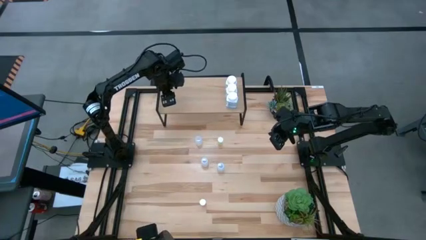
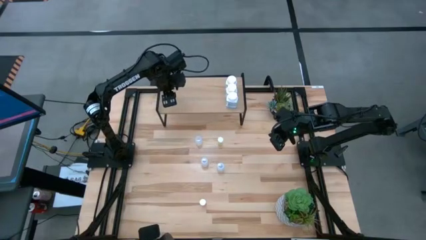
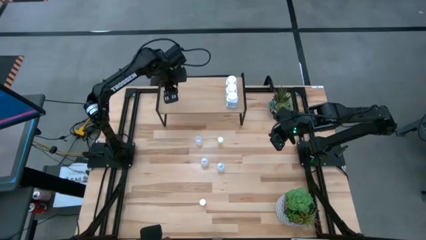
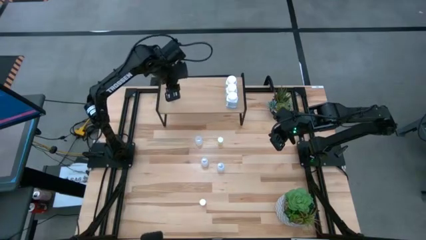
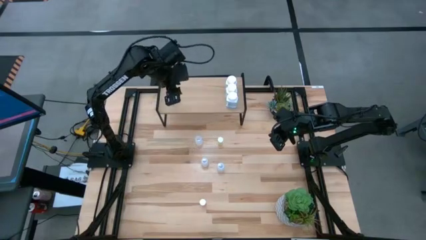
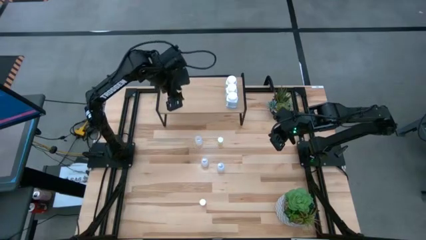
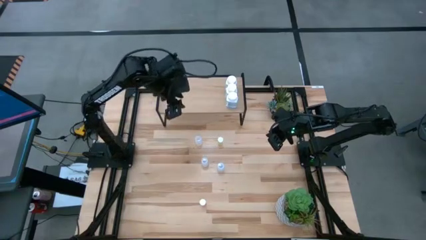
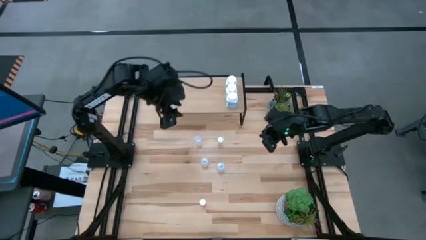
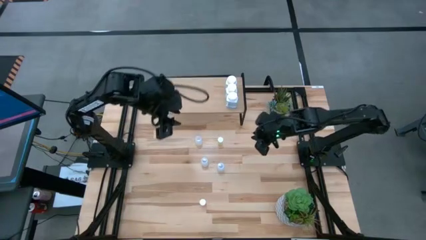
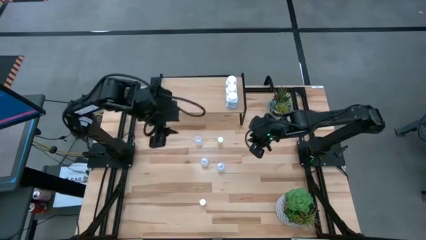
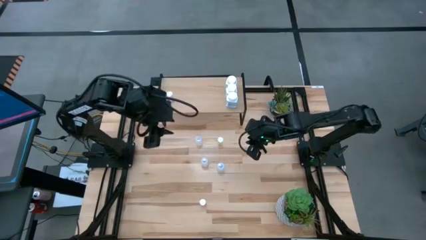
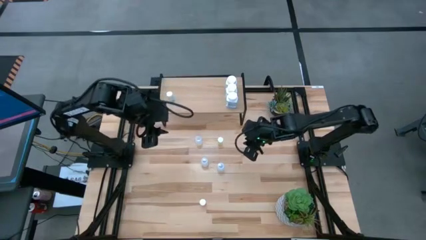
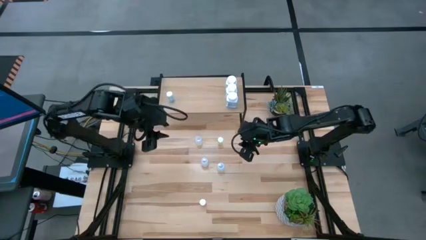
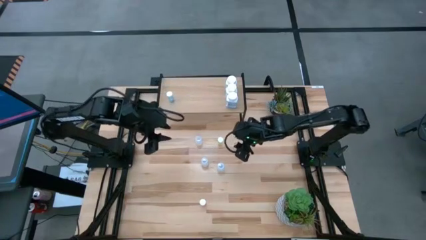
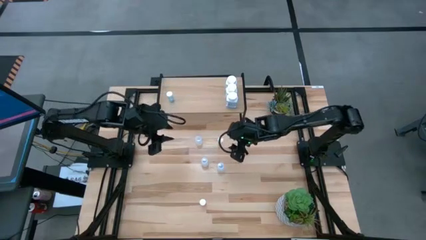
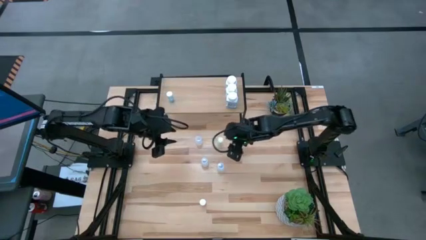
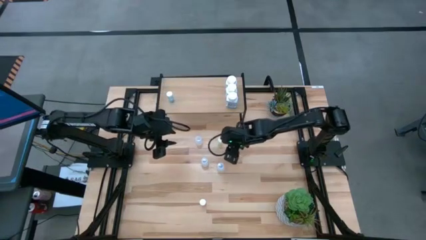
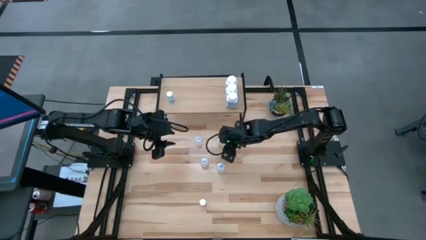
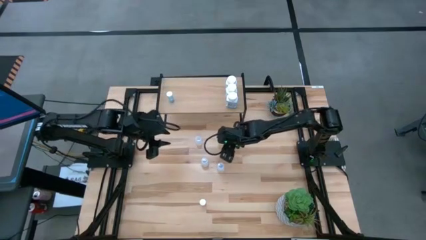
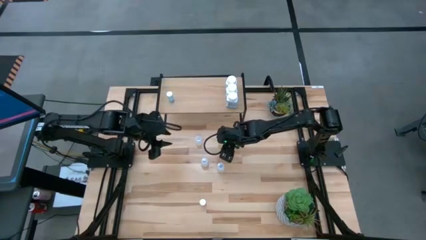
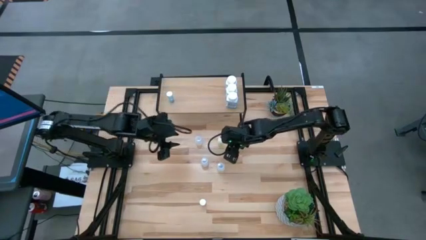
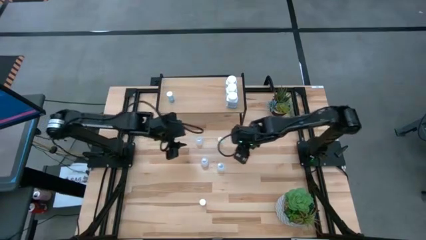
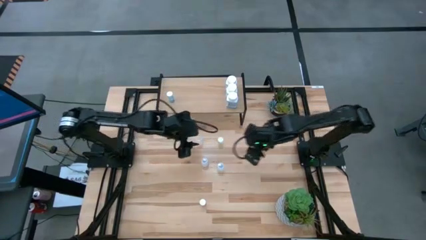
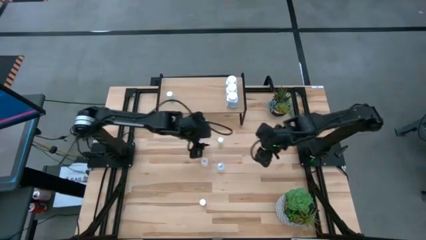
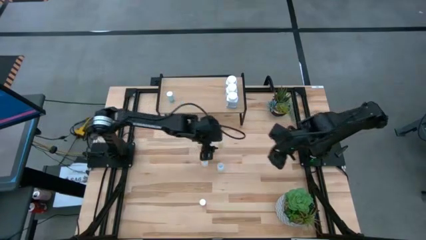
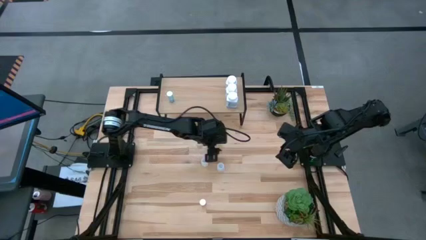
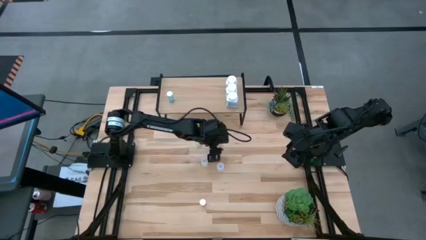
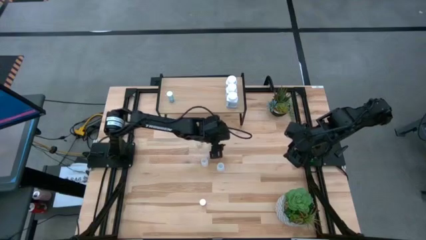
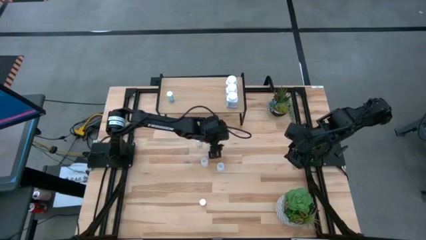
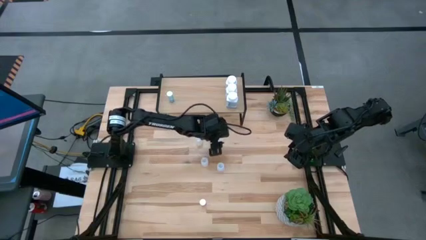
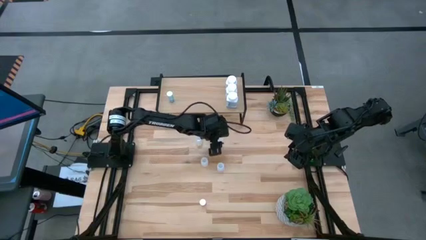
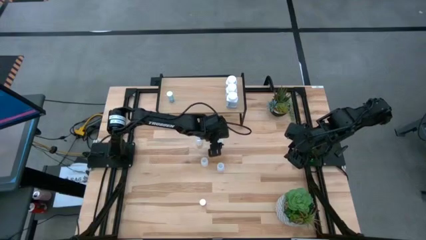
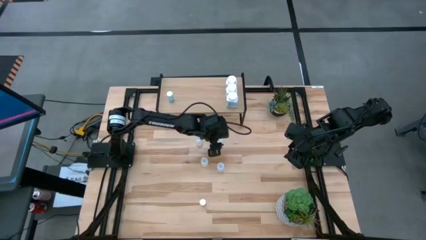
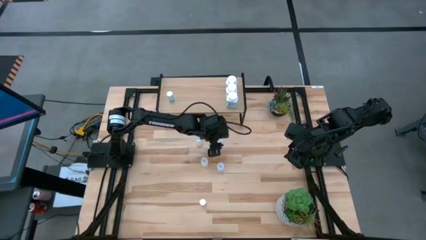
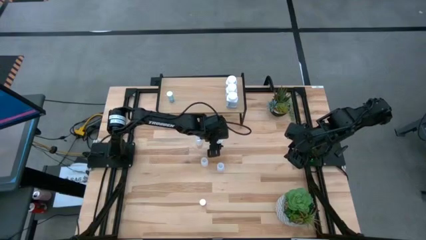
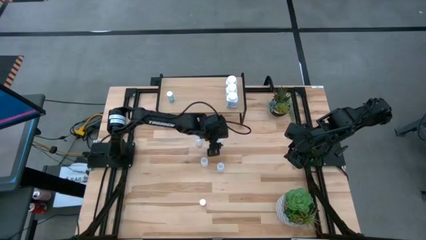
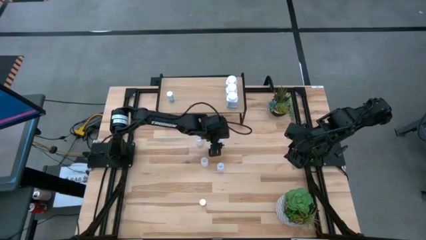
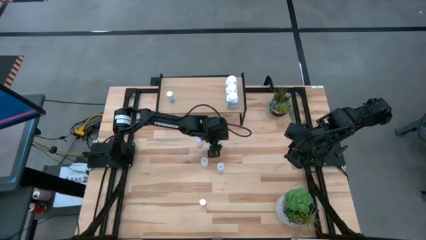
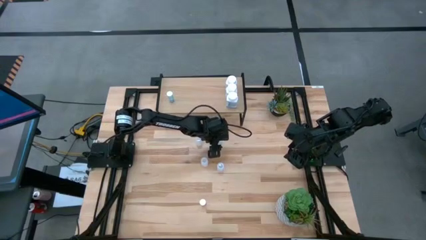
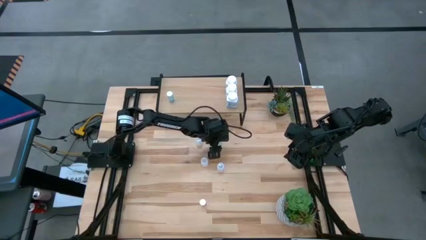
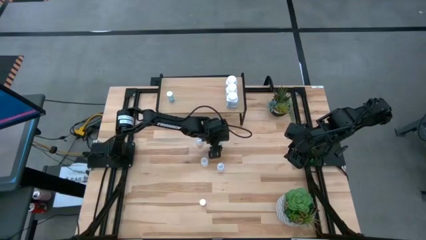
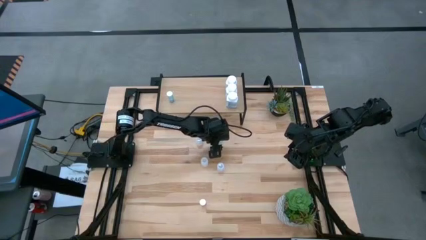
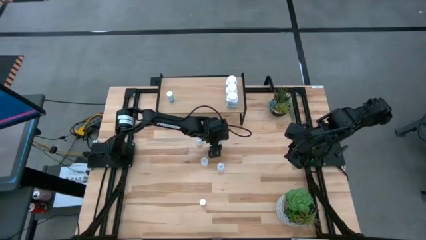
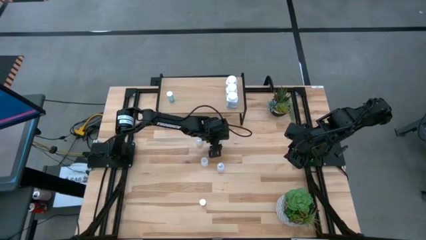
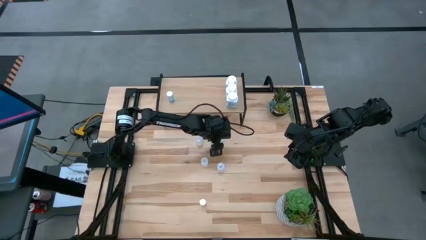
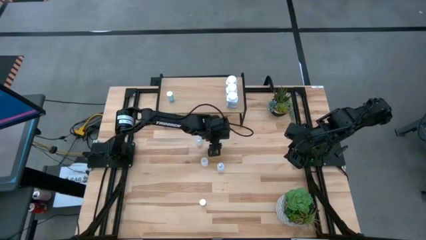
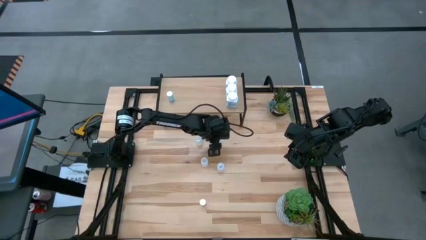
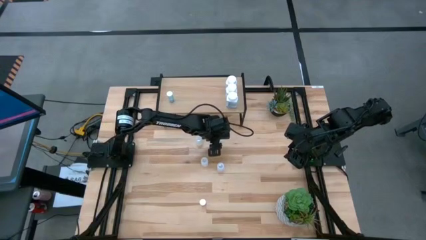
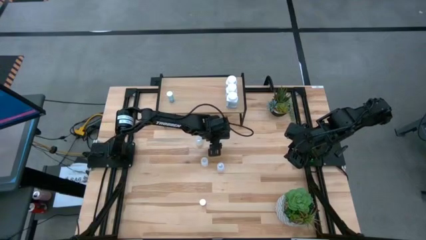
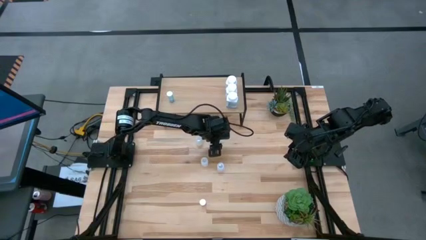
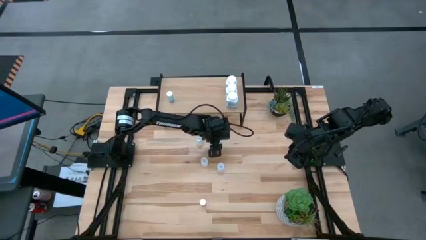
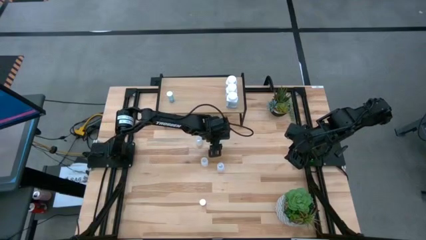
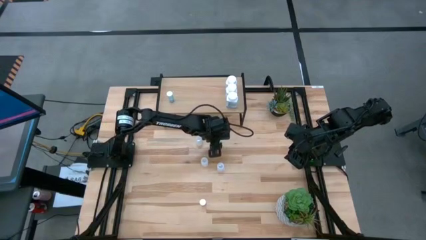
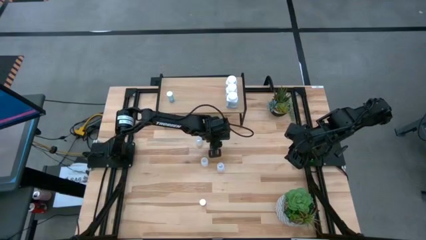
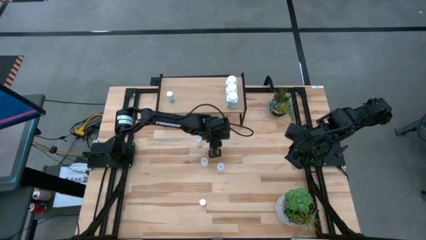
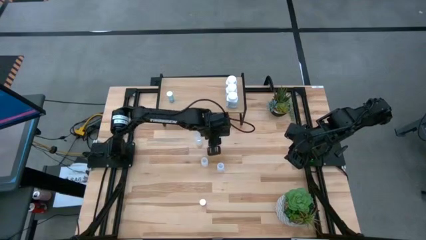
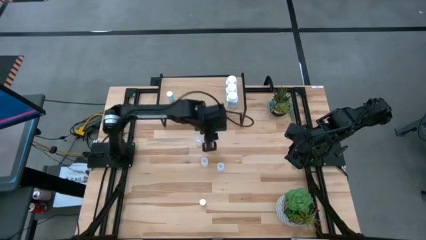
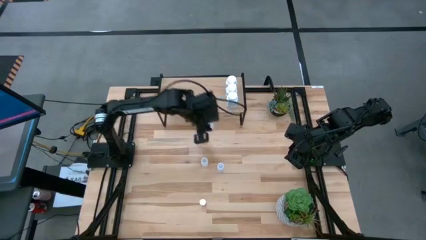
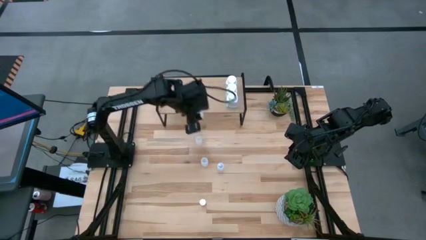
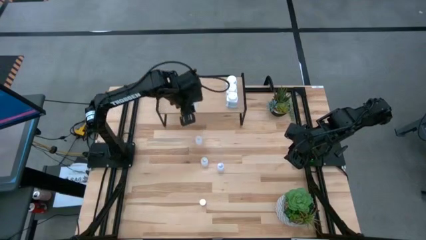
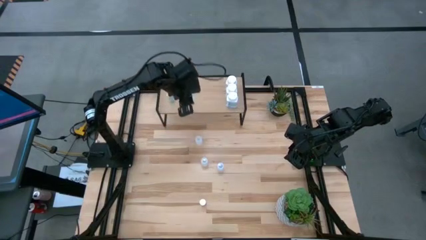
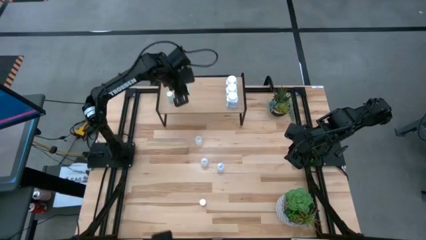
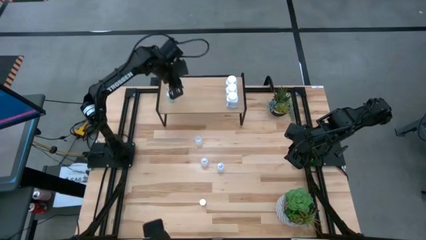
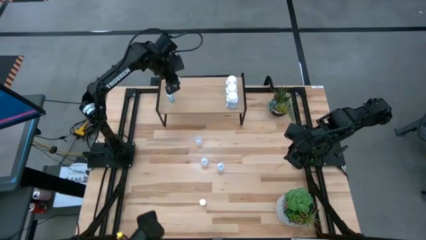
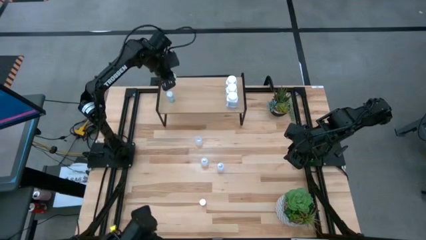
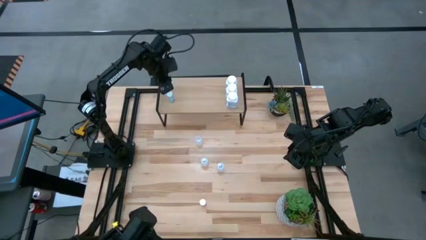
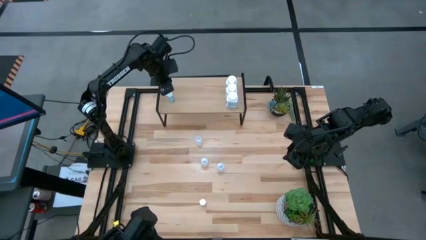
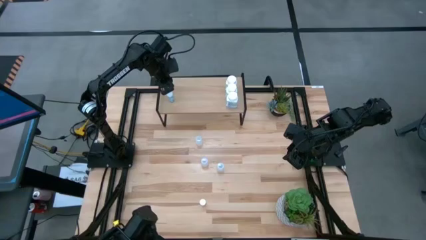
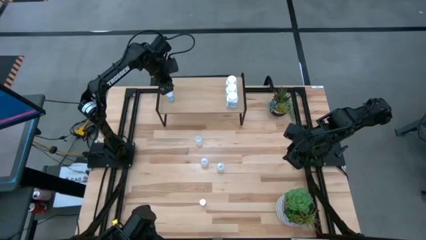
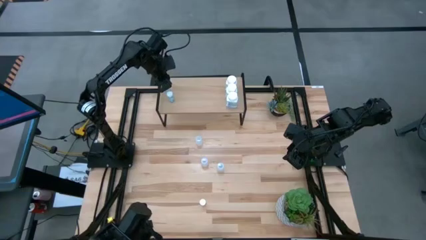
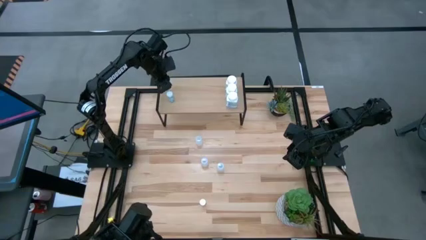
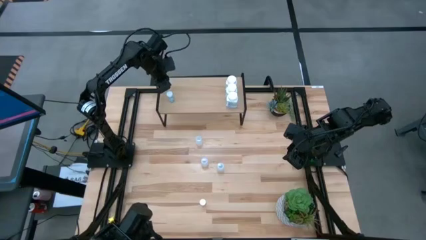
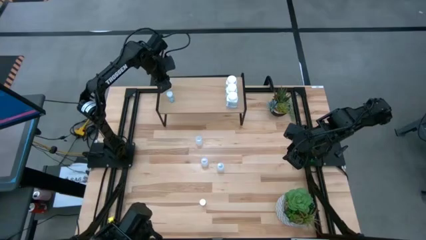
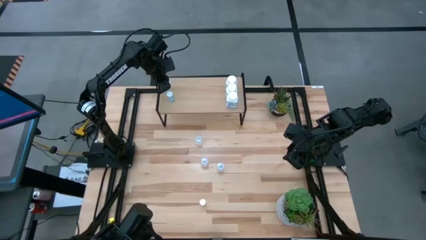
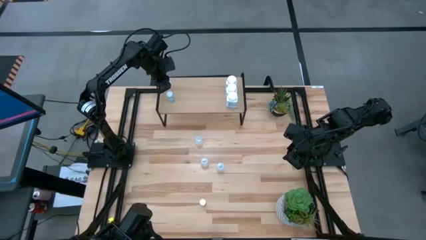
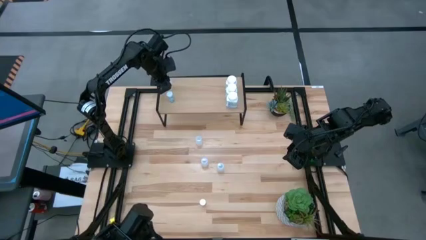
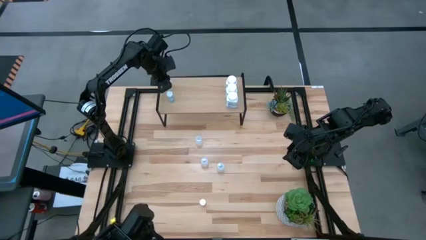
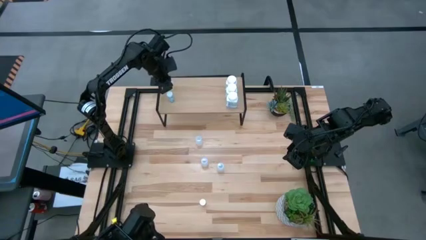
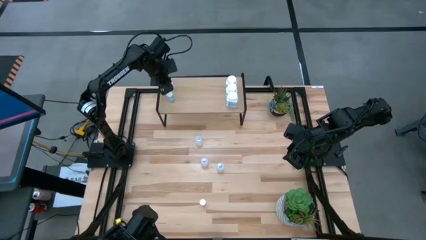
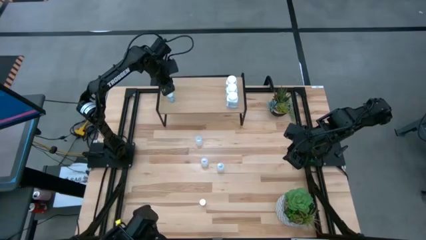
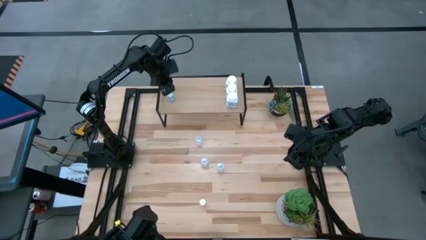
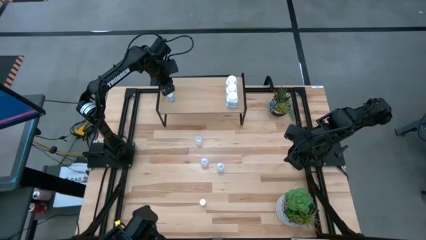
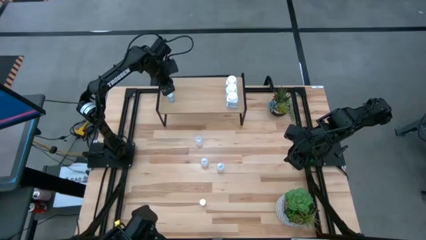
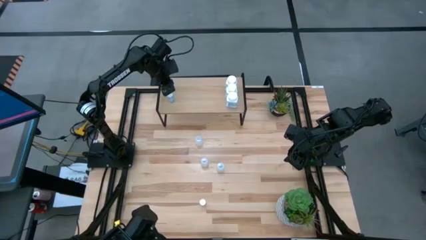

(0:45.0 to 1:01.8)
Task: Pick and place medicine bottles onto shelf by color
Put the yellow pill bottle on the shelf
